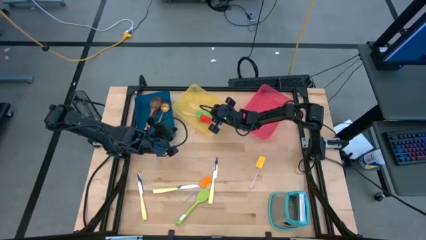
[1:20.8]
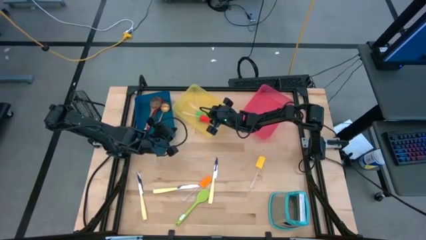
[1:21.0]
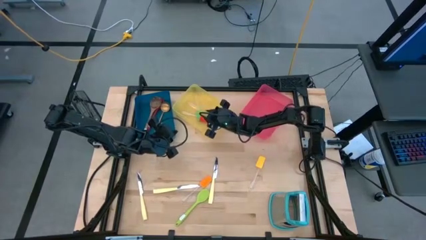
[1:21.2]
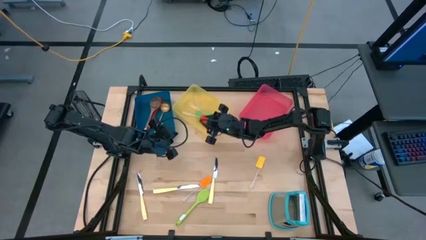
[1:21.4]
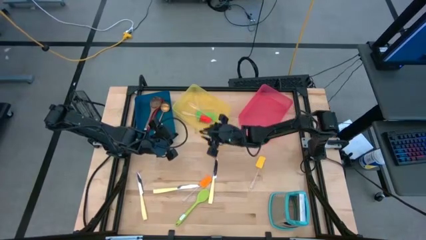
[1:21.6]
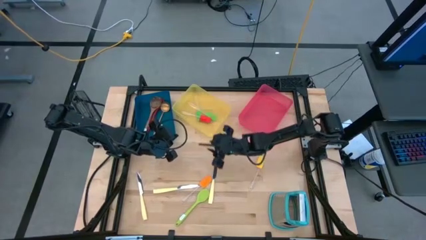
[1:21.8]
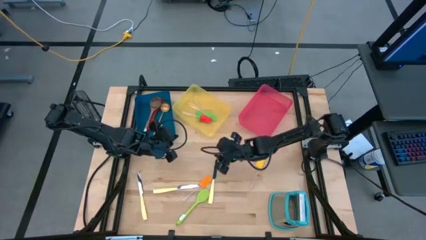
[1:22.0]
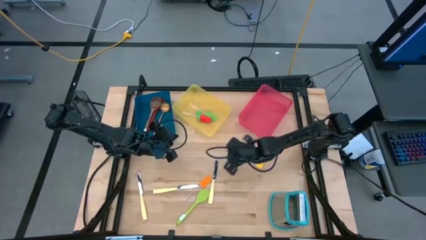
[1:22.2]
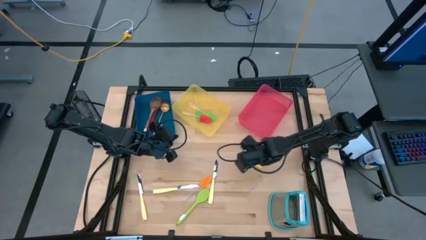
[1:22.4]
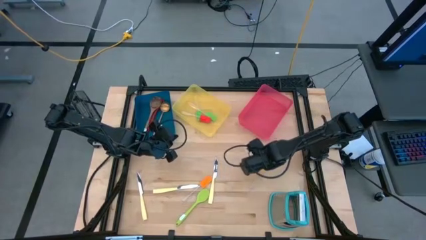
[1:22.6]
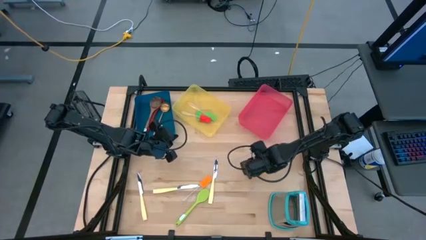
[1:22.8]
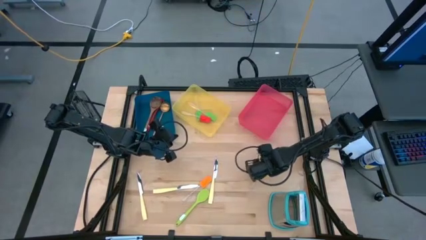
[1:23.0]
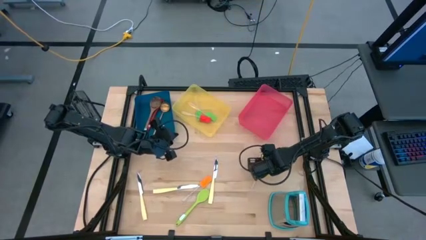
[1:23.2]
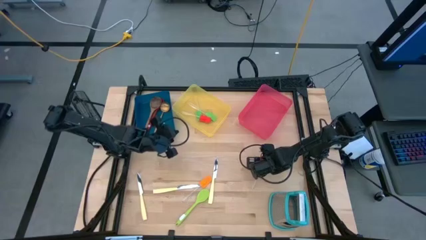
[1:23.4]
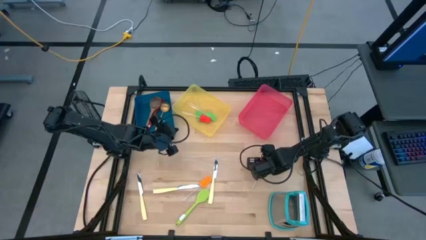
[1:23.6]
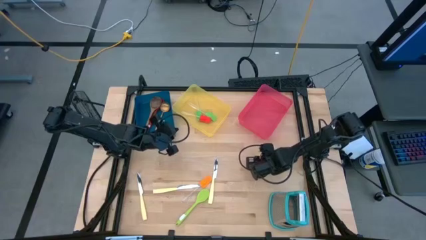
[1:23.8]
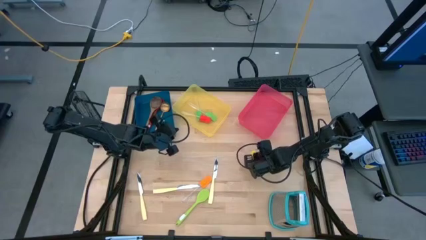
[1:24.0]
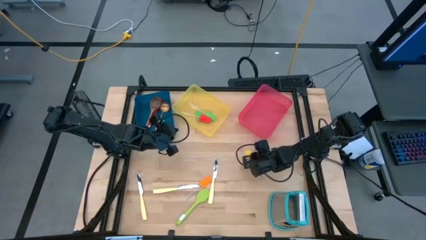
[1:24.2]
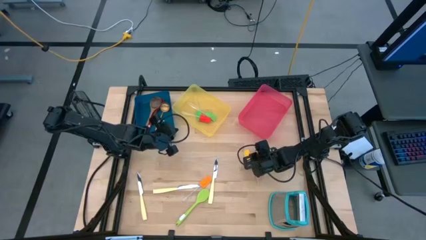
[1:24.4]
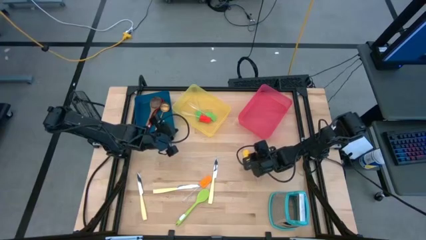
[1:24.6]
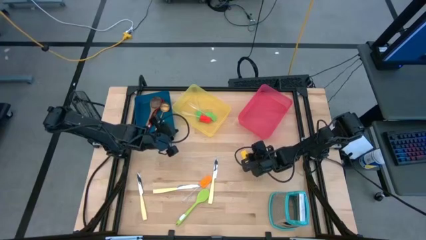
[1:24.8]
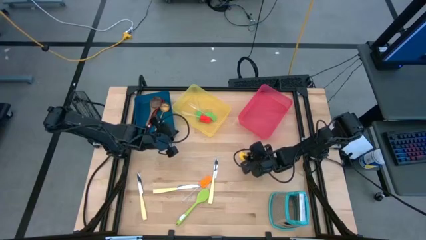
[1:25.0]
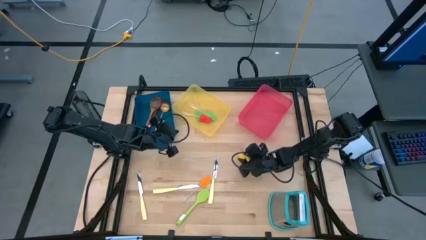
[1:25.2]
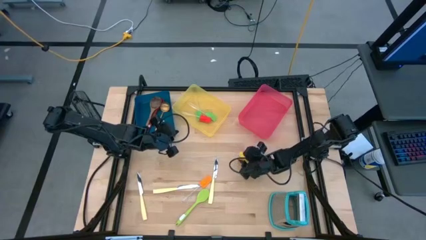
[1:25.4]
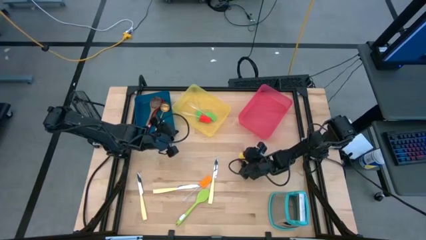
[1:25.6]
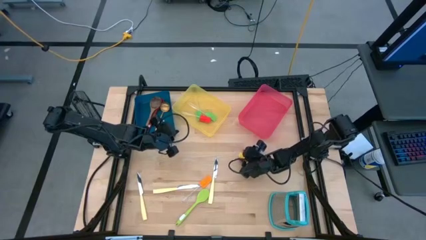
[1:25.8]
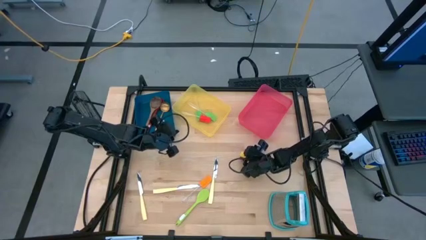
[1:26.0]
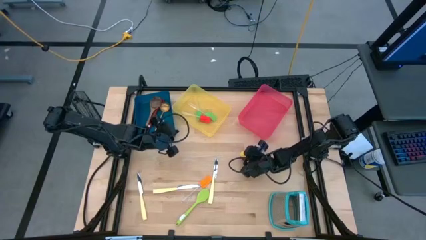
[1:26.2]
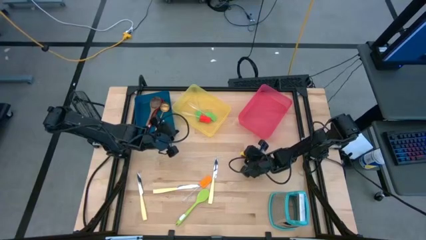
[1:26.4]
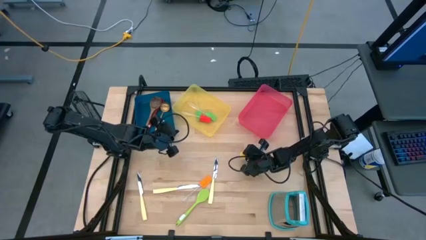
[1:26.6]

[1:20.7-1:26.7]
Task: Pick & Place Kitchen Items
Put the yellow spatula into the yellow bin

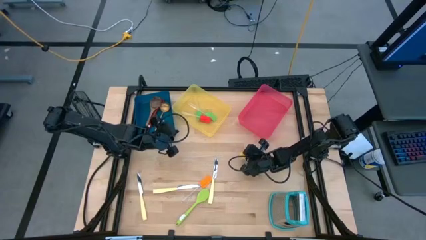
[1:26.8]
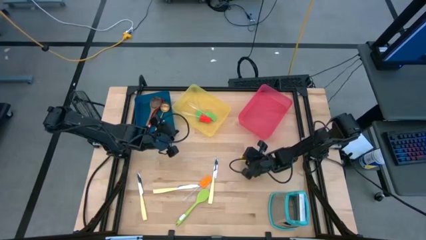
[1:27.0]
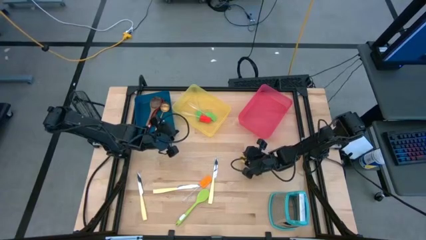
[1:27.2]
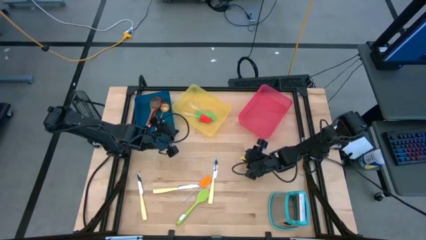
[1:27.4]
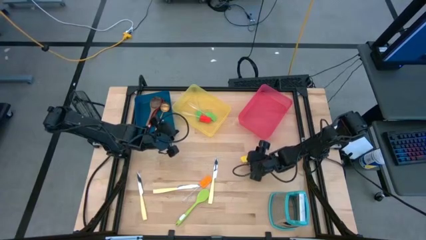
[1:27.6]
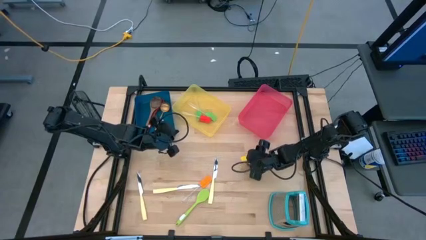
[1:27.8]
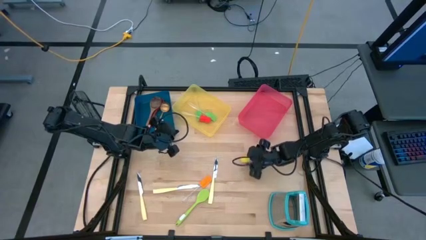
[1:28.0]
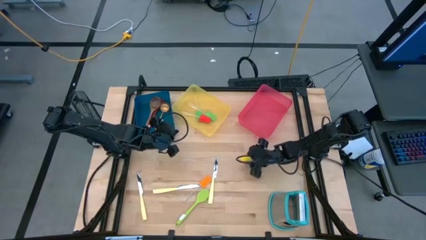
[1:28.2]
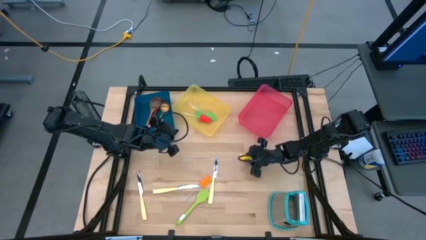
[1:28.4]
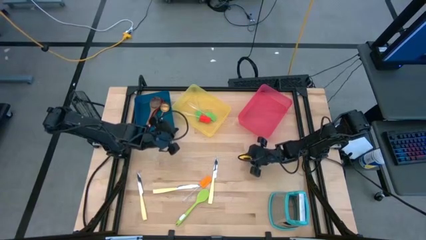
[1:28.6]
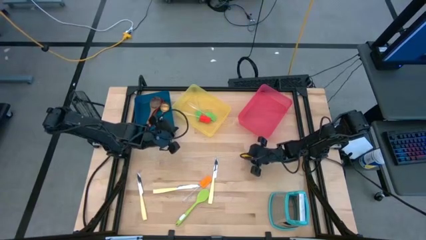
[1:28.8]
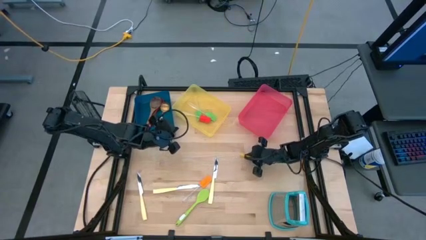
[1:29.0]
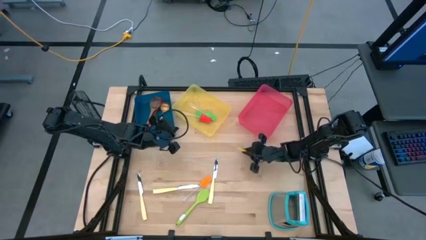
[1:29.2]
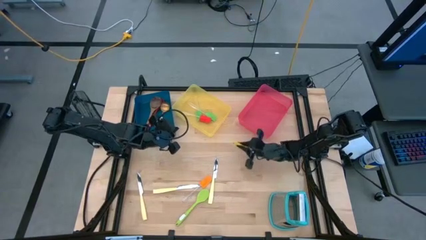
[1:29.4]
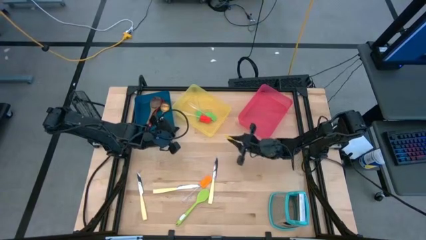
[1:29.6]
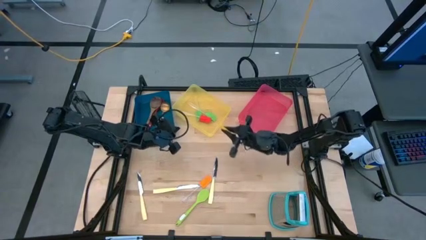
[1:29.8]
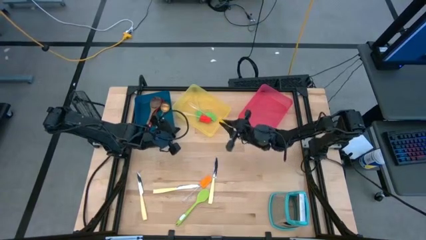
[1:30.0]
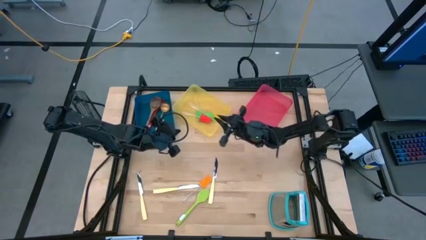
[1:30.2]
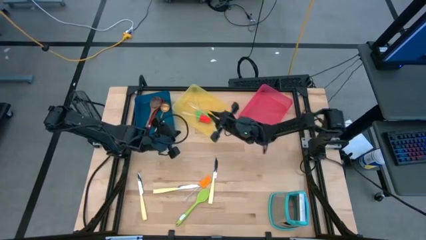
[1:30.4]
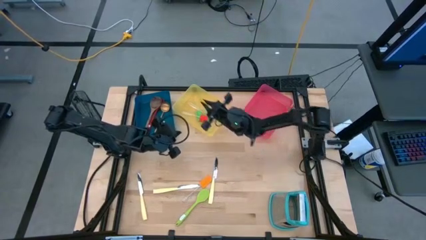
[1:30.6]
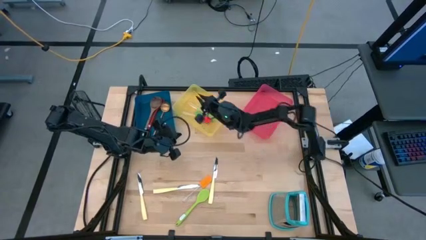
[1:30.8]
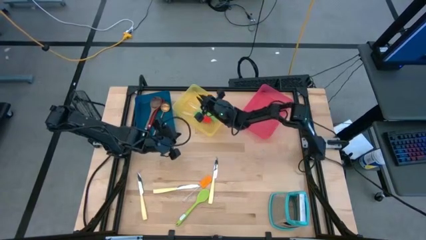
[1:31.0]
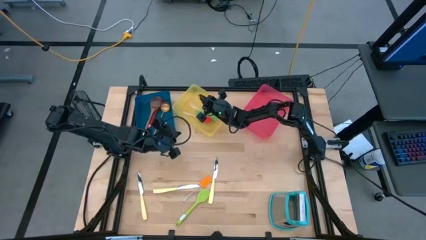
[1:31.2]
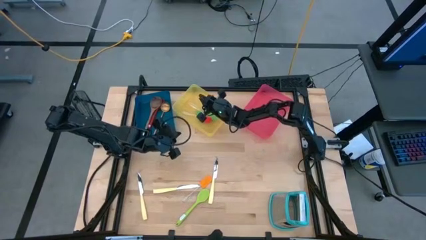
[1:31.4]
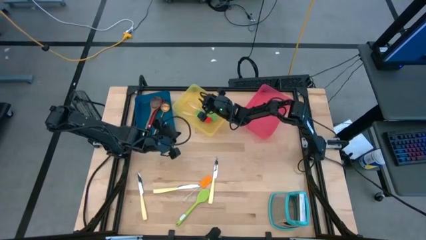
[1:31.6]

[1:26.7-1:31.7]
Put the yellow spatula into the yellow bin

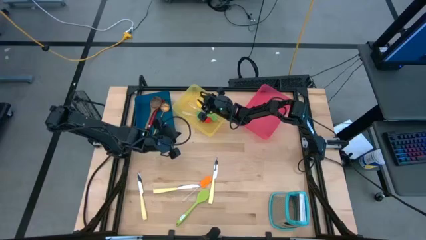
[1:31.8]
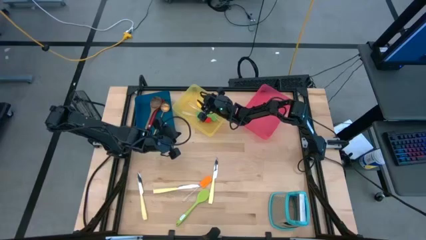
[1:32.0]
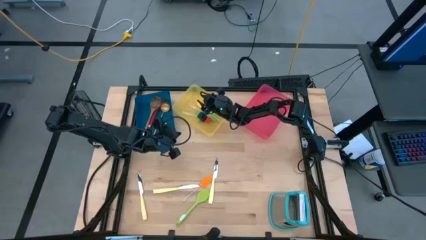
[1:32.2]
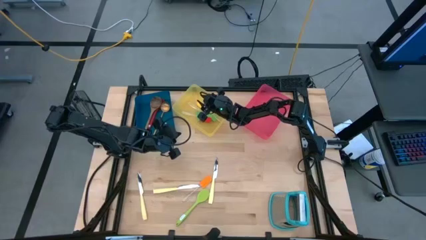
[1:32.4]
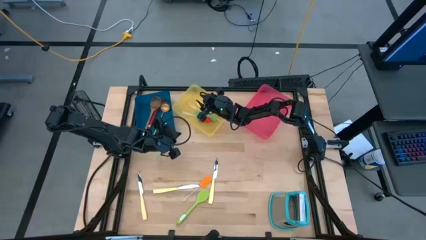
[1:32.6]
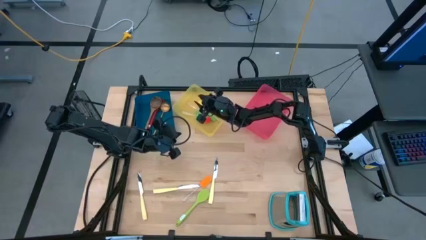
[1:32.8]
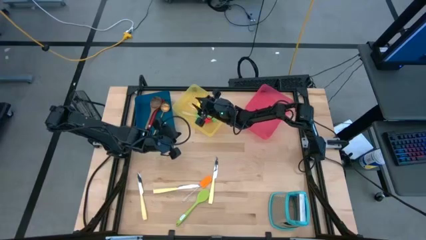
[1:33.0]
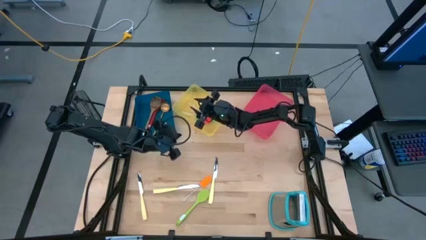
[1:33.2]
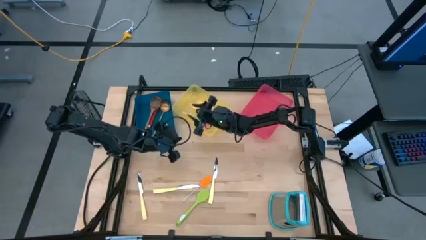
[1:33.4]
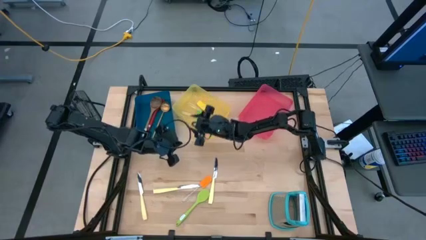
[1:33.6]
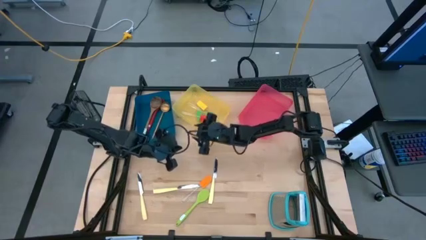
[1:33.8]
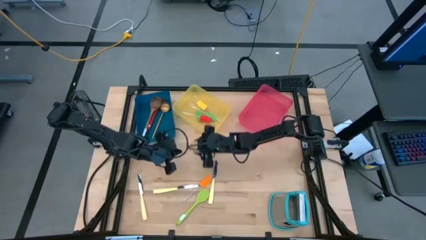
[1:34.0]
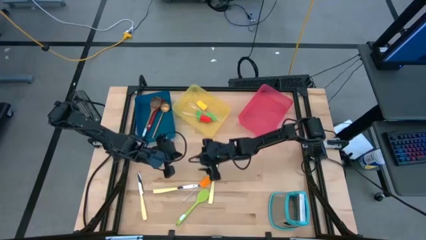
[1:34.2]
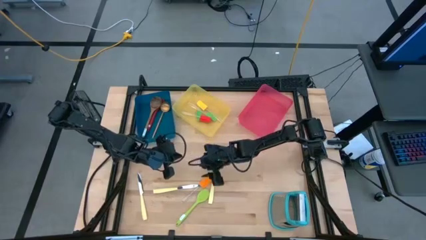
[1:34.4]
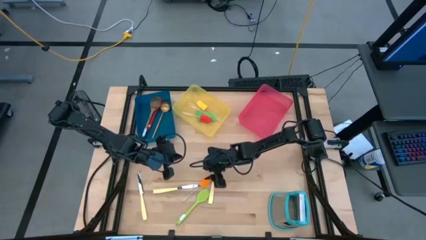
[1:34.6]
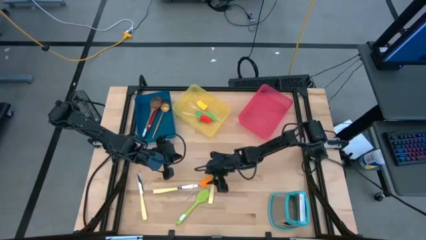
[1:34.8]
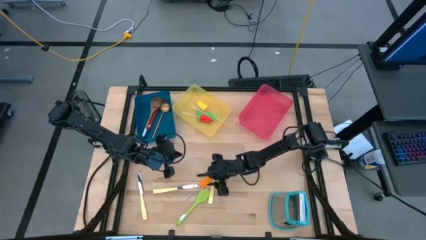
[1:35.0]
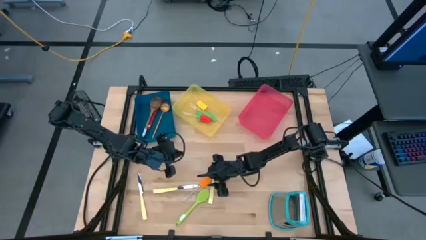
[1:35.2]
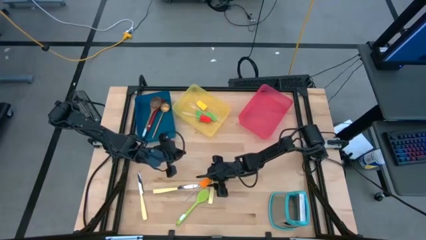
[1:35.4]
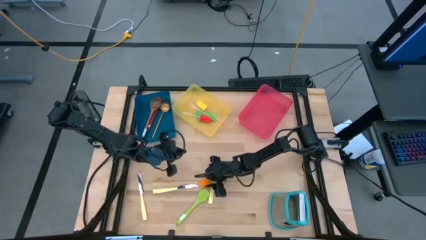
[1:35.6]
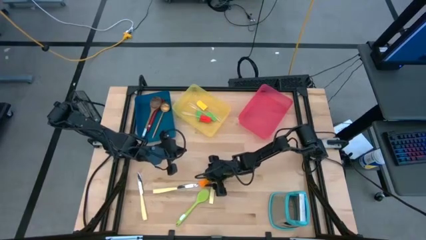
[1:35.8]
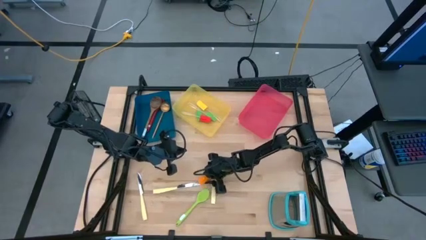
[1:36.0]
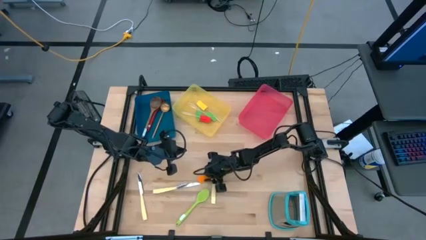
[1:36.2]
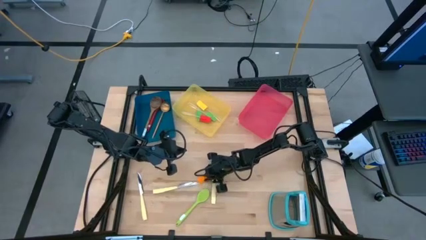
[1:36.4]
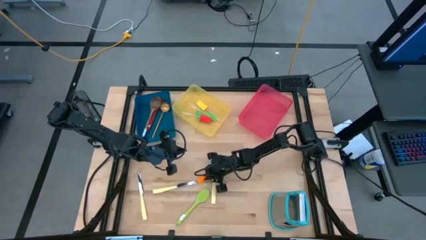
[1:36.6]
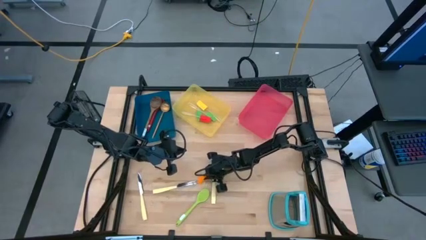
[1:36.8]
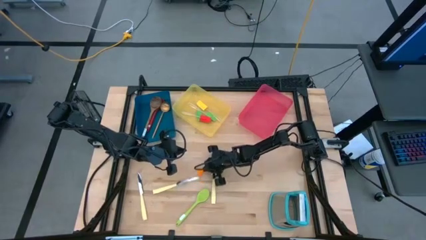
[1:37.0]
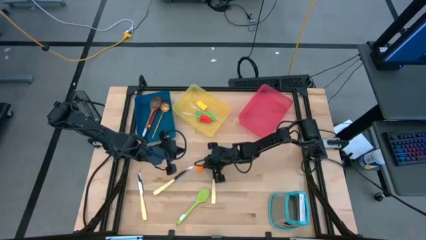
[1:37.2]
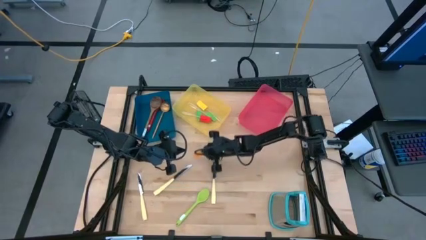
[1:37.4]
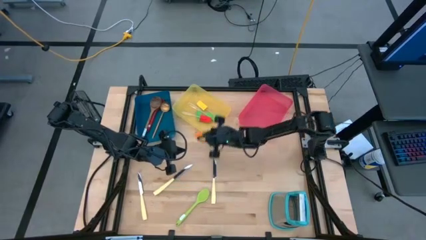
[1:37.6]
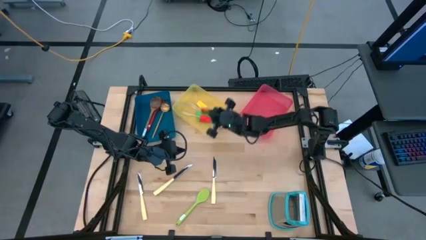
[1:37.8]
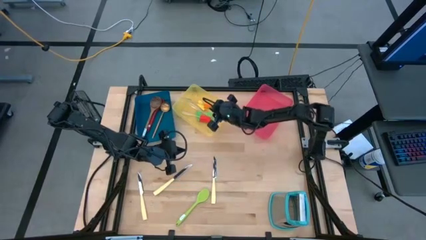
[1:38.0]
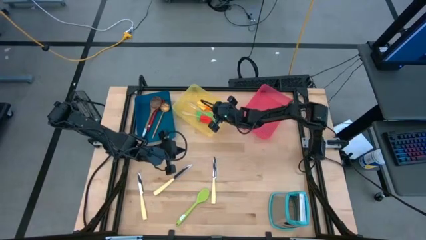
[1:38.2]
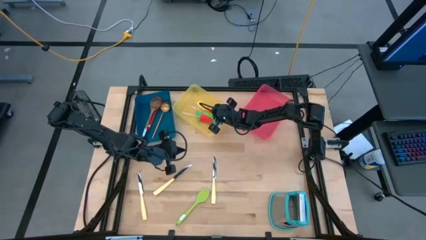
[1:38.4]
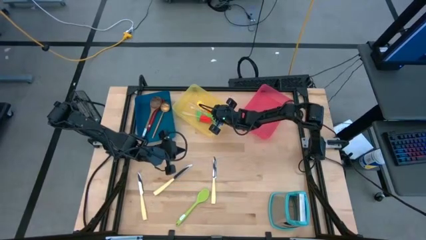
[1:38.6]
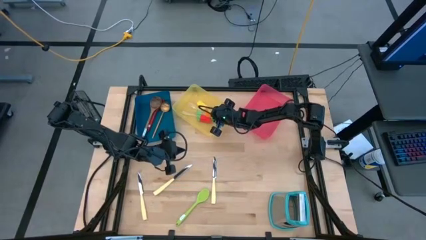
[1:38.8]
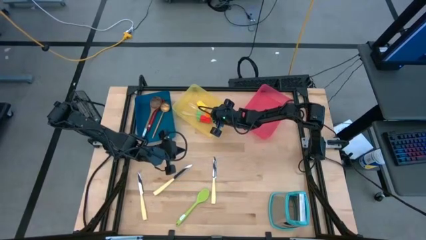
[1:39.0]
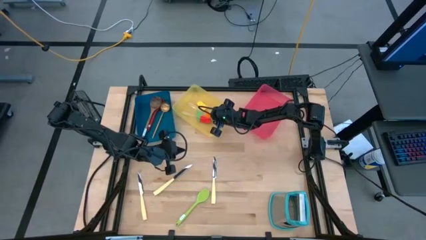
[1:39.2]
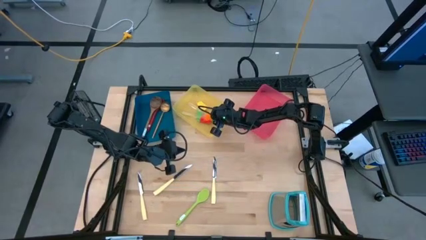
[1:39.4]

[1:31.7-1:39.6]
Put the orange spatula into the yellow bin
